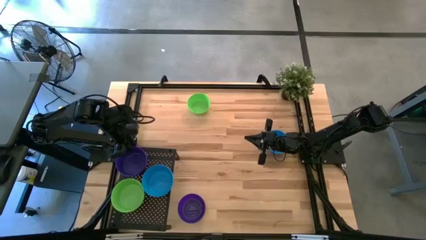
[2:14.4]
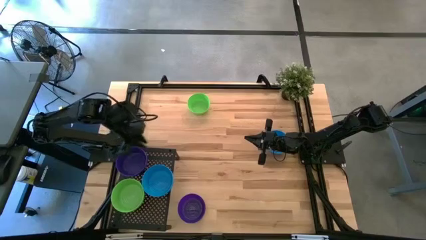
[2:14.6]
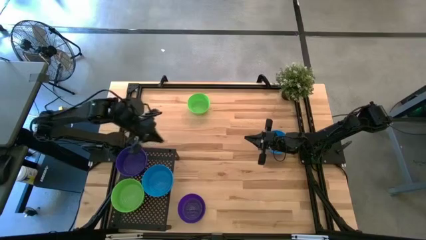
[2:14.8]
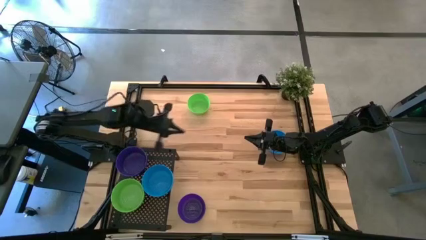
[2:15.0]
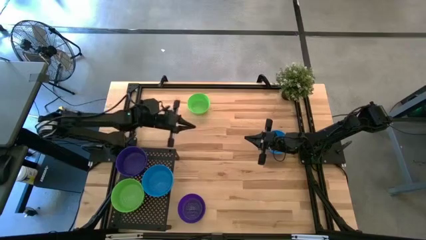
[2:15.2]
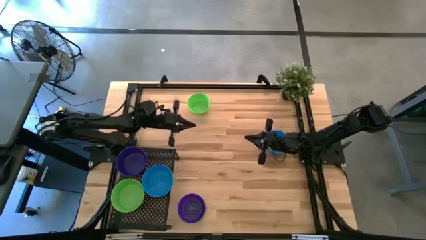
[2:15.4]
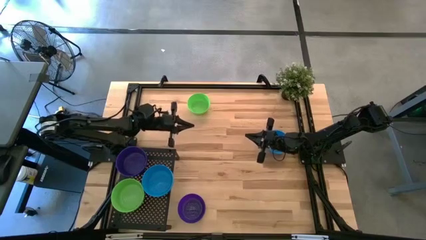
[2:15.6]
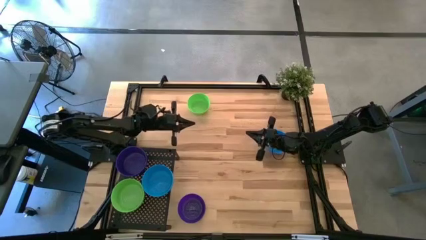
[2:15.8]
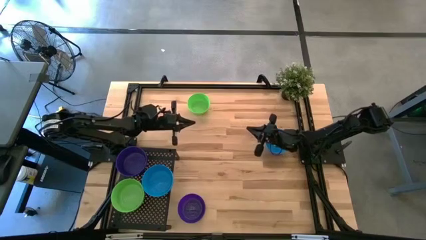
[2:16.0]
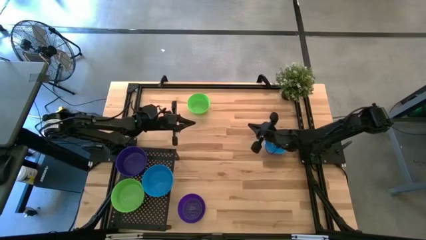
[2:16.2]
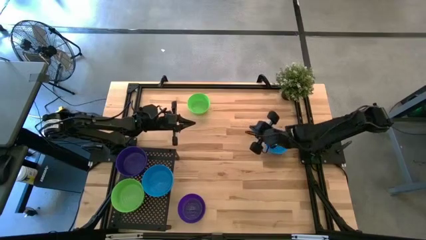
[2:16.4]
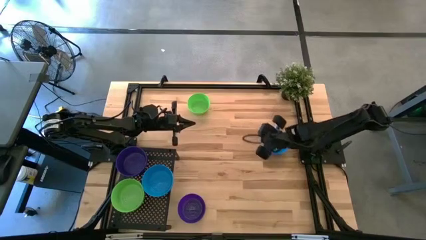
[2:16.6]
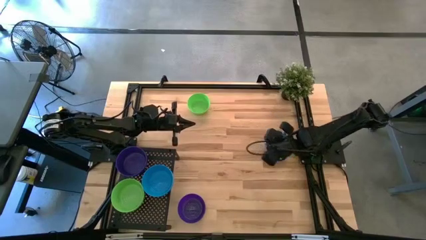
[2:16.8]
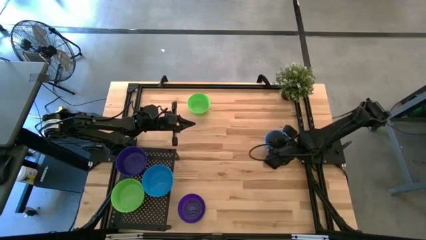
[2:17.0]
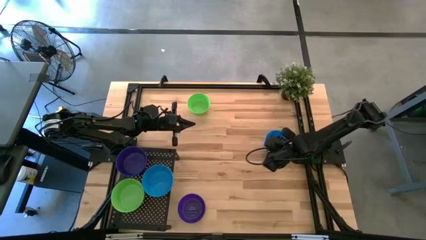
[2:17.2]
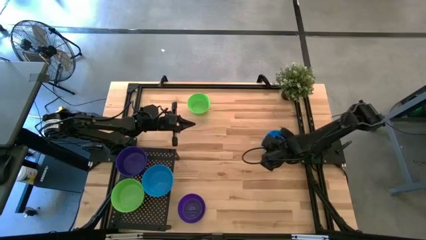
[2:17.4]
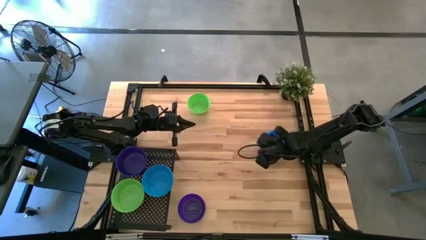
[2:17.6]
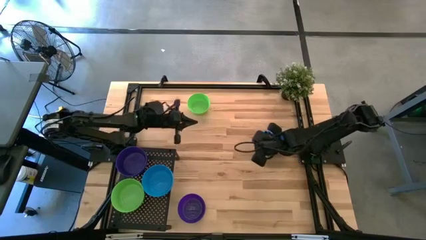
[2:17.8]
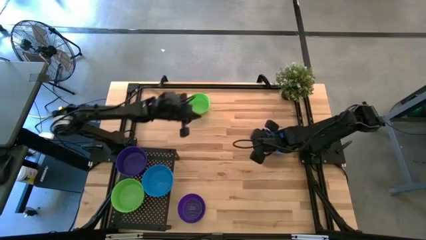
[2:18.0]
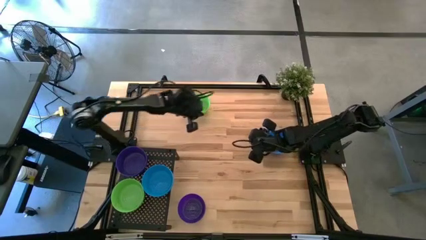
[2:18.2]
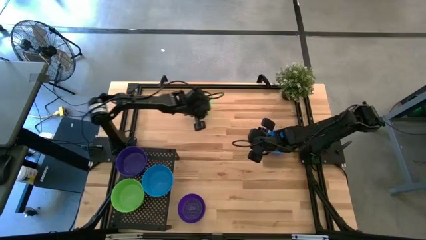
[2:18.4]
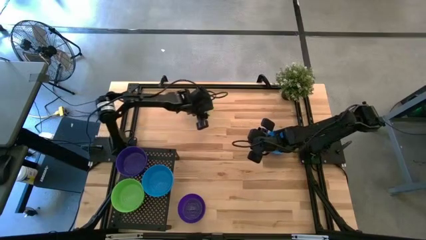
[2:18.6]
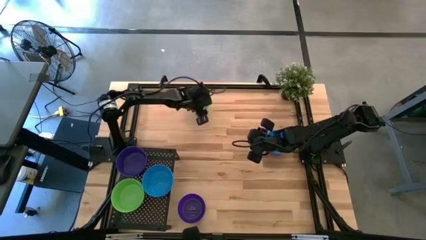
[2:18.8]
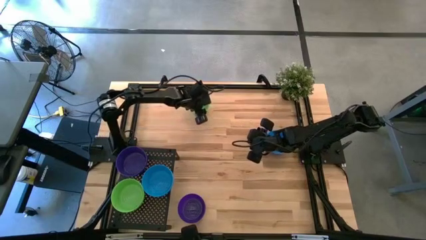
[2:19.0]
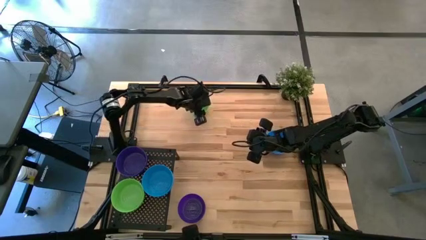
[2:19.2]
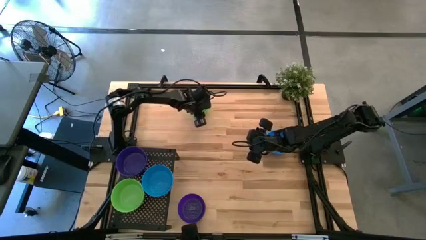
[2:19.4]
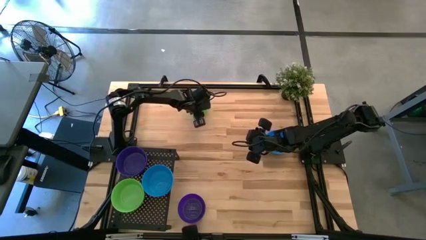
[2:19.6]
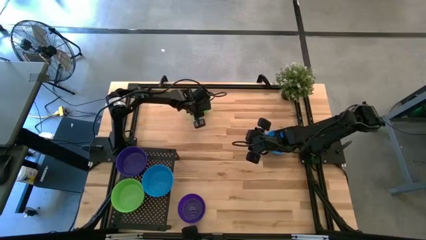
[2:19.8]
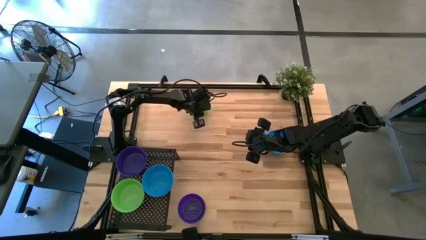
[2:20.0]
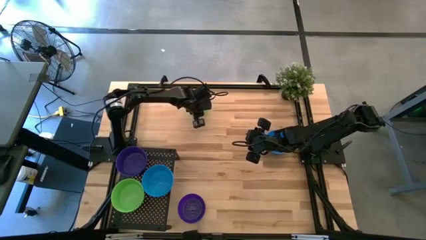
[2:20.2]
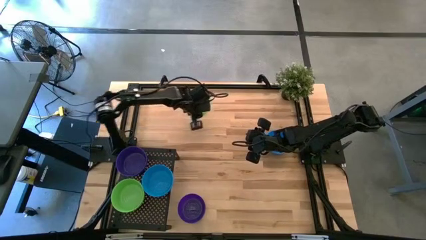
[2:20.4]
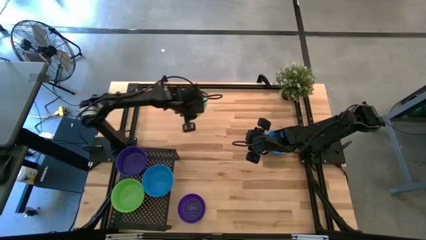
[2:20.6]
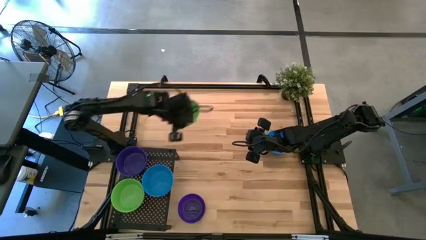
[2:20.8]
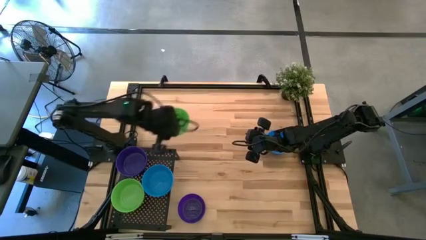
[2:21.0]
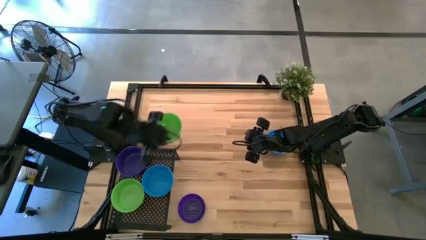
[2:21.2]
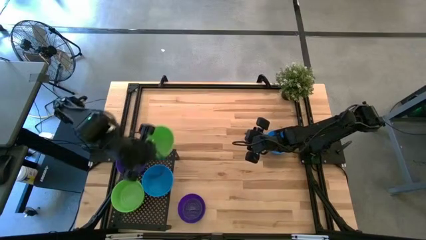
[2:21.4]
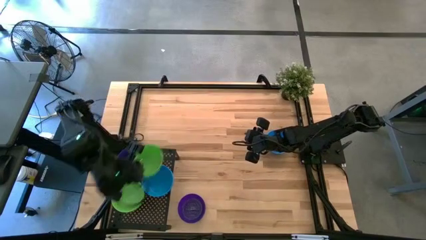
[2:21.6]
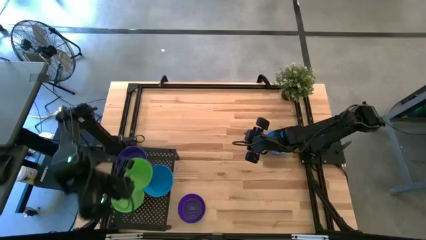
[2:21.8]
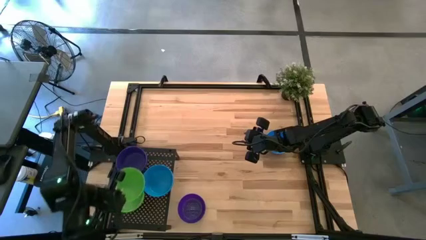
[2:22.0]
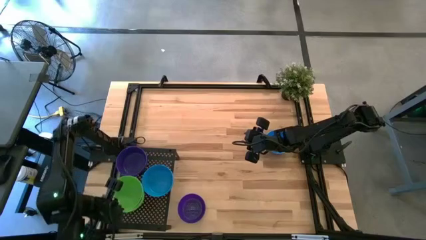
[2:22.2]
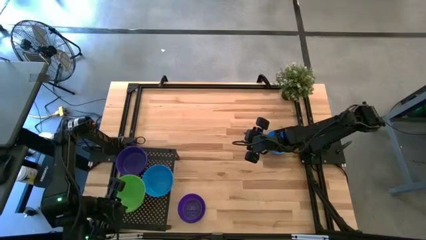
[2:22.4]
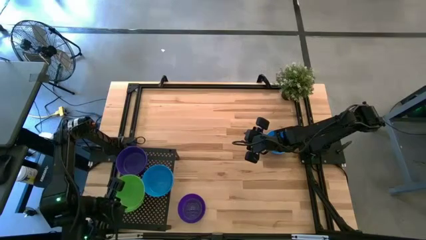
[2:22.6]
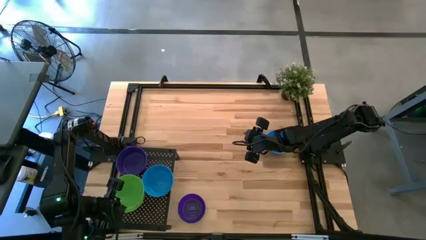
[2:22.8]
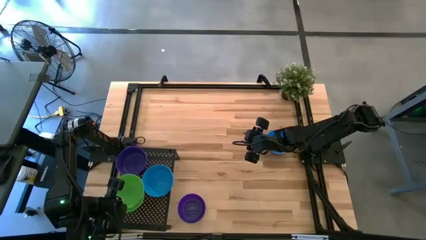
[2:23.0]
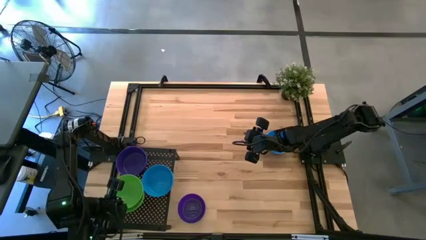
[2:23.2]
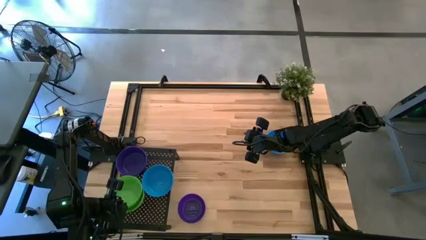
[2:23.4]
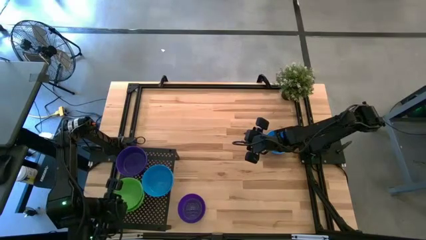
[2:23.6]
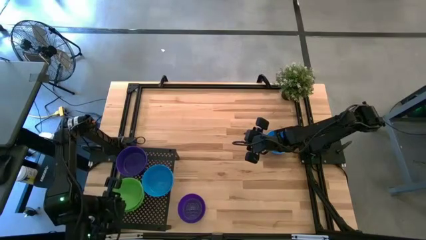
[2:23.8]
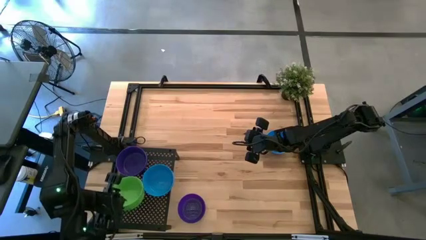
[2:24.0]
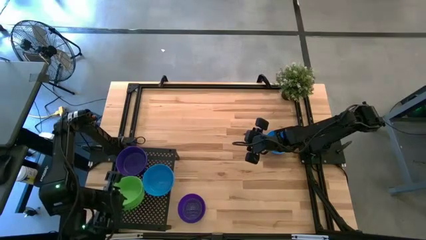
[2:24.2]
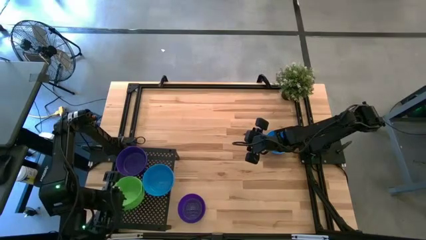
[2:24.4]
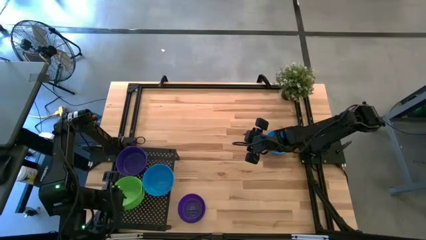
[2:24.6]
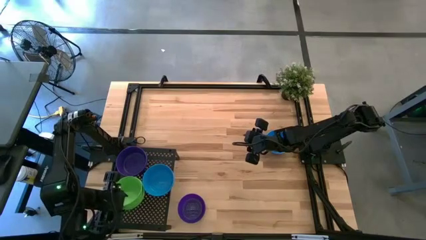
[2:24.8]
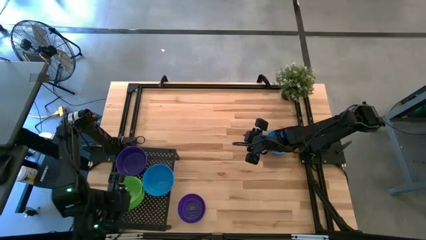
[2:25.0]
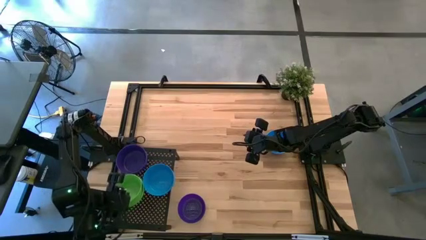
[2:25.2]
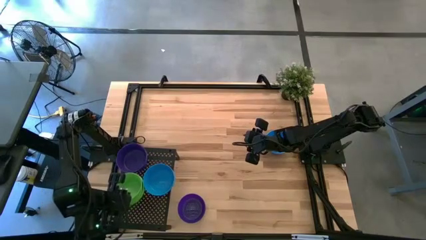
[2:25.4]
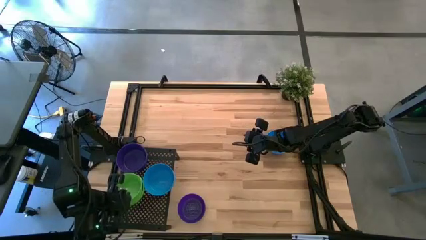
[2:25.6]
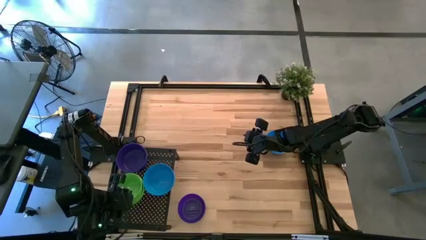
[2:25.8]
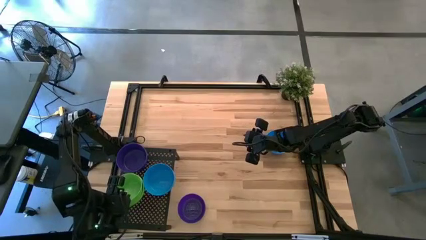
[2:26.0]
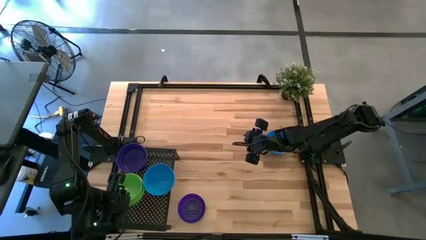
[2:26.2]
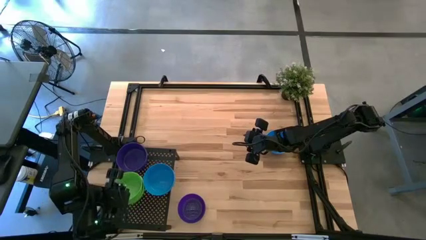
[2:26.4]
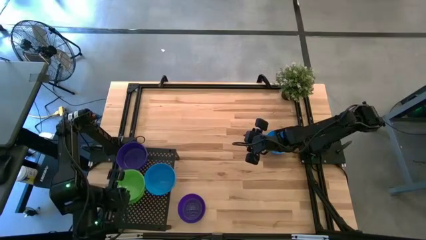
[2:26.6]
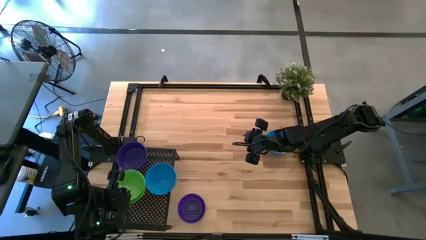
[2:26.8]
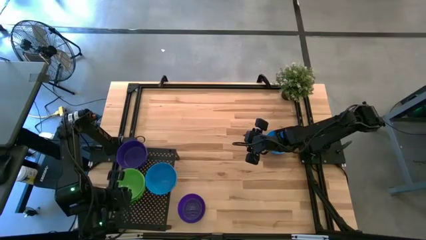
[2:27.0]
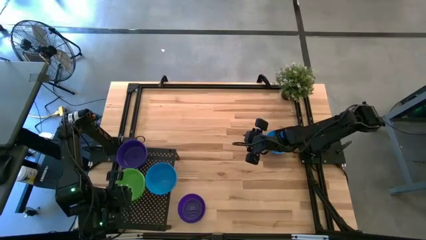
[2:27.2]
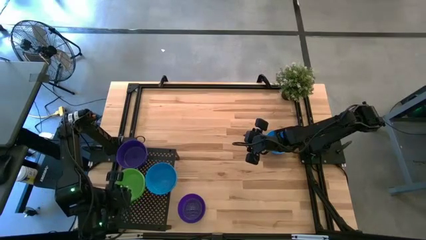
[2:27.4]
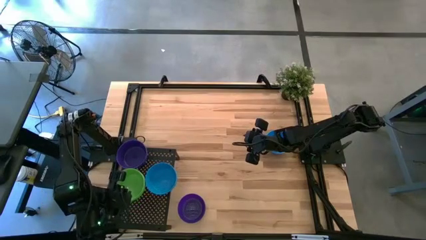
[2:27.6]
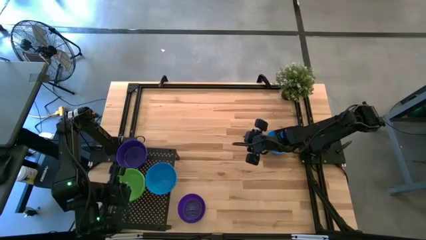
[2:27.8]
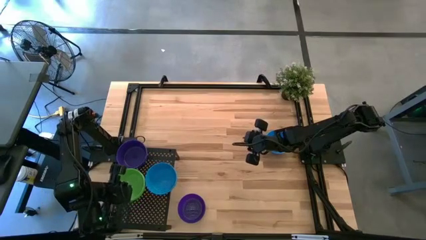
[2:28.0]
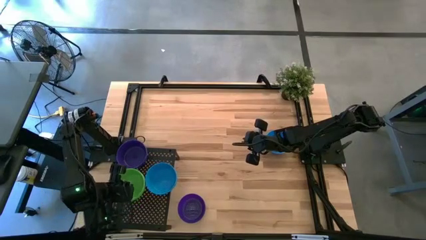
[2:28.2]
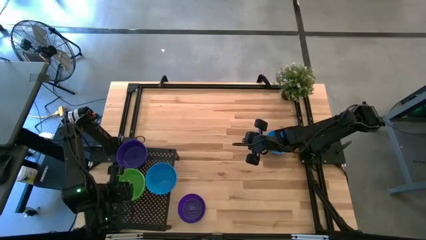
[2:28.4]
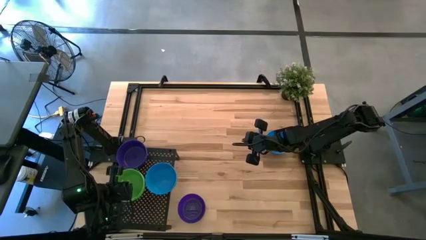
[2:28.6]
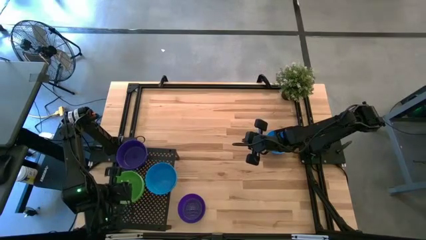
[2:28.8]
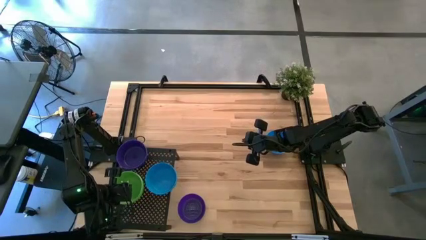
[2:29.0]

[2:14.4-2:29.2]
Task: Pick & Place Mini bowls
Stack the green bowl on the other green bowls on the shelf

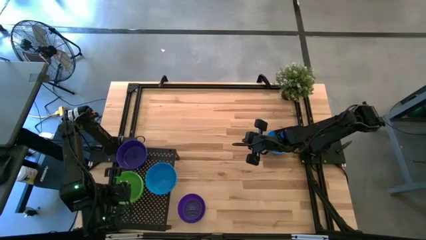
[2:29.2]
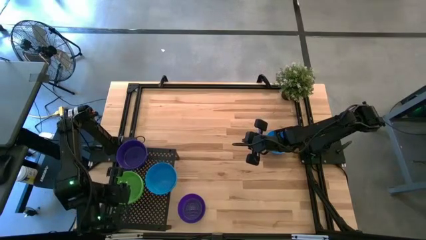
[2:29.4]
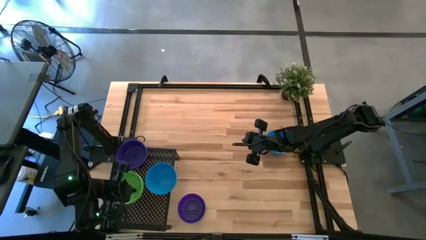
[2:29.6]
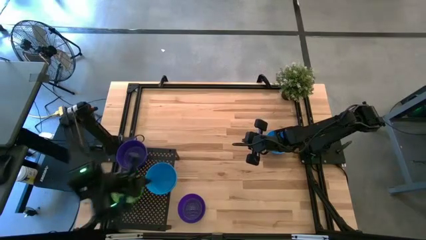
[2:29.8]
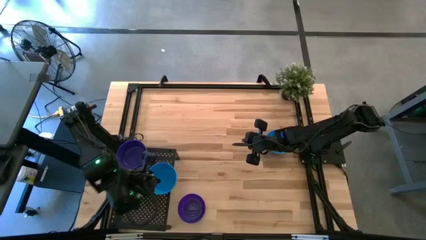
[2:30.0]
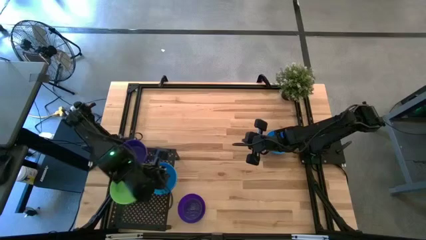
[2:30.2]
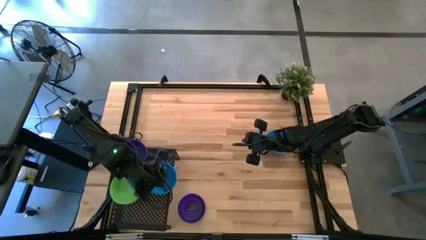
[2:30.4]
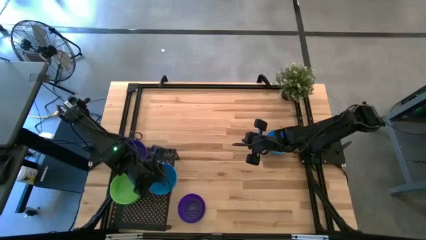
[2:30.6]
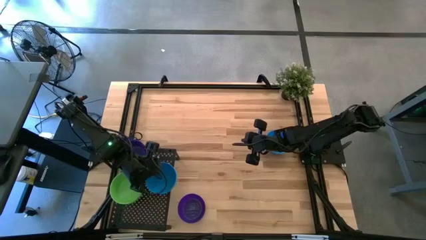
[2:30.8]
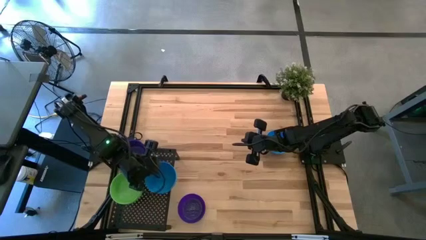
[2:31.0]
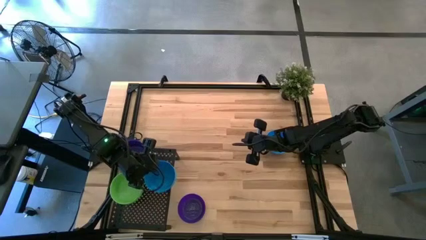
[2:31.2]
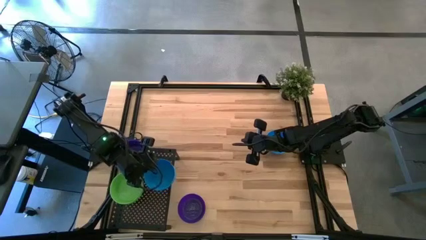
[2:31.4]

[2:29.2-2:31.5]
Adjust the blue bowls on the shelf
